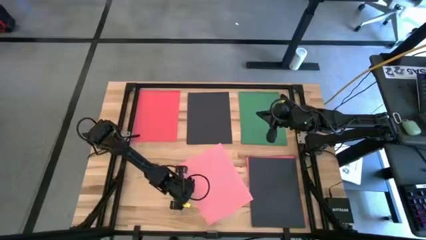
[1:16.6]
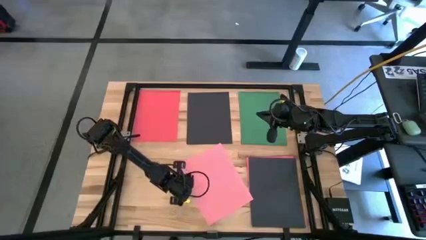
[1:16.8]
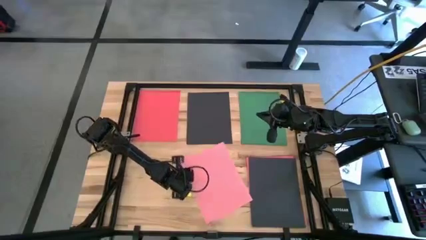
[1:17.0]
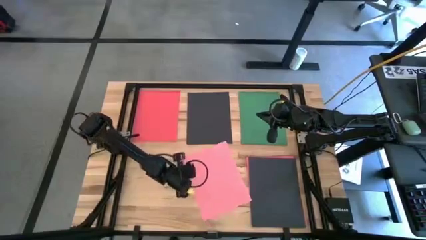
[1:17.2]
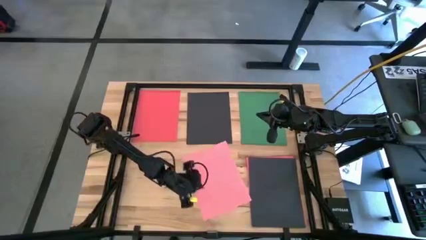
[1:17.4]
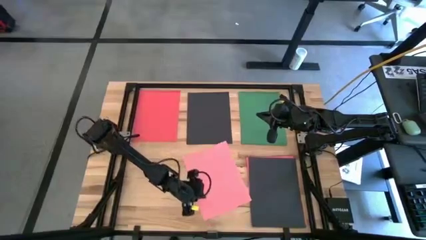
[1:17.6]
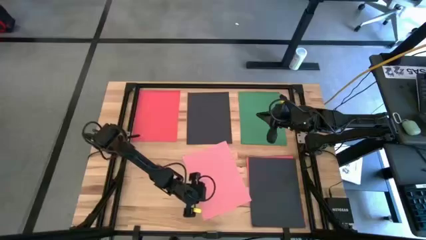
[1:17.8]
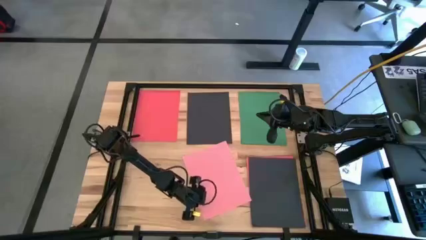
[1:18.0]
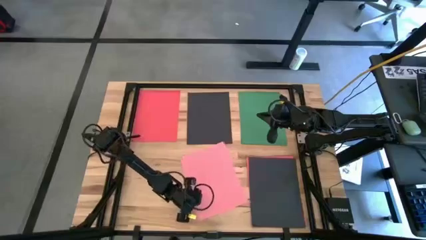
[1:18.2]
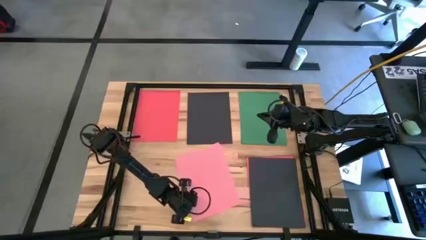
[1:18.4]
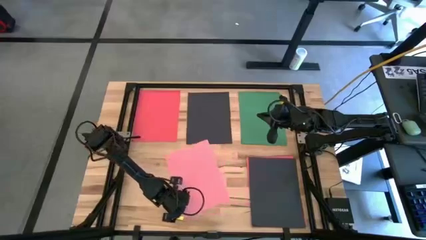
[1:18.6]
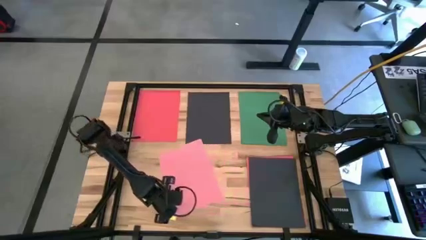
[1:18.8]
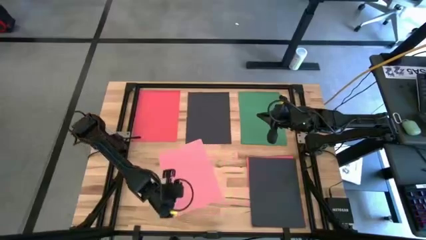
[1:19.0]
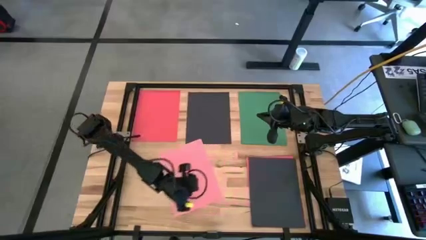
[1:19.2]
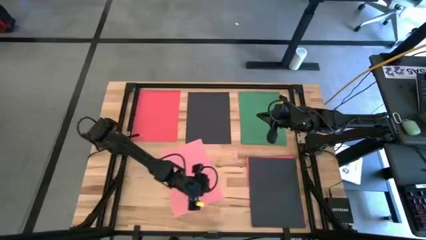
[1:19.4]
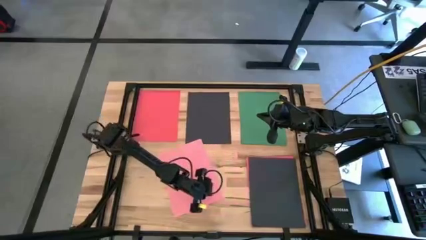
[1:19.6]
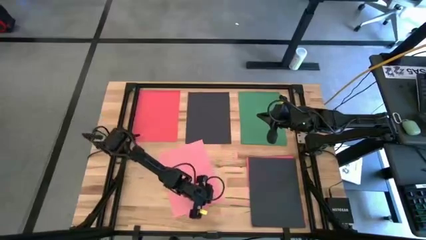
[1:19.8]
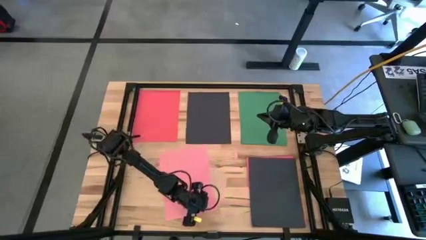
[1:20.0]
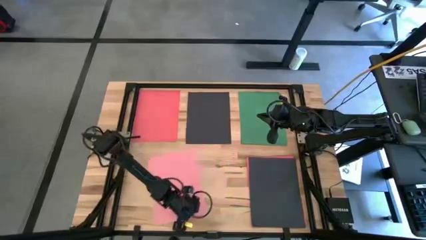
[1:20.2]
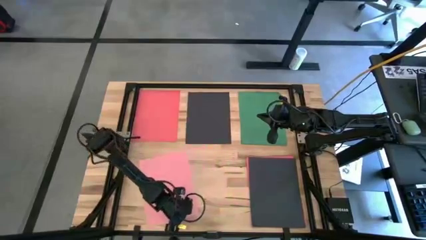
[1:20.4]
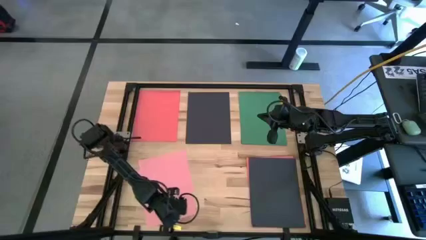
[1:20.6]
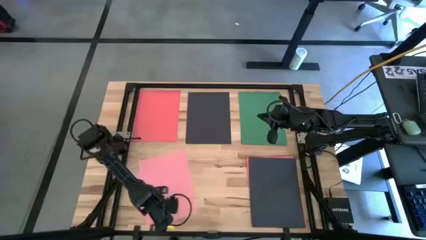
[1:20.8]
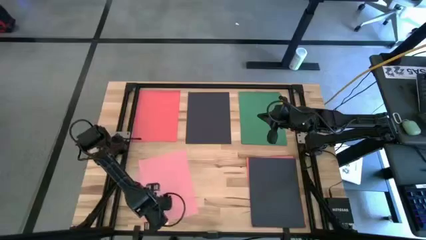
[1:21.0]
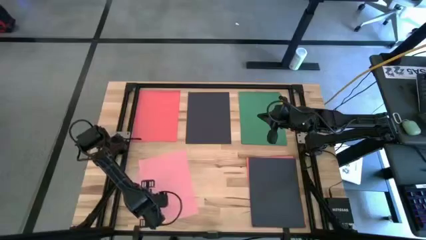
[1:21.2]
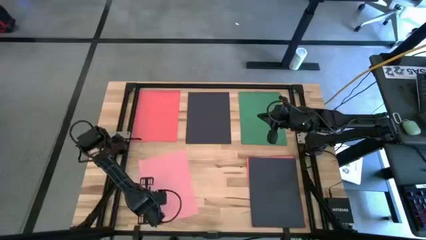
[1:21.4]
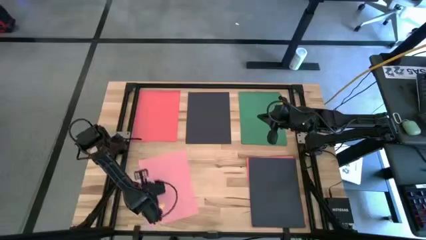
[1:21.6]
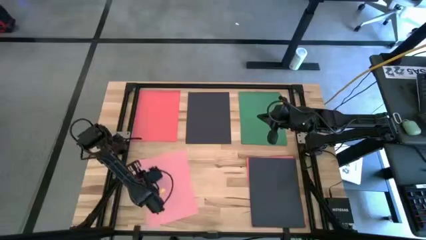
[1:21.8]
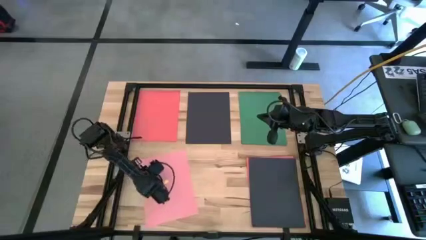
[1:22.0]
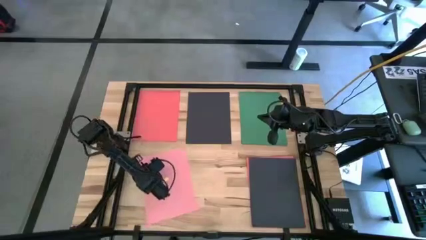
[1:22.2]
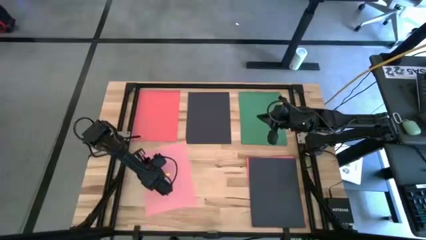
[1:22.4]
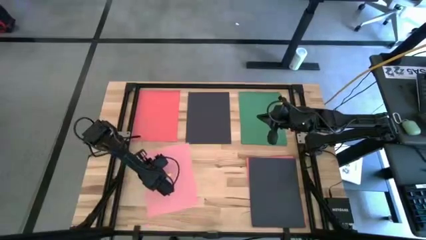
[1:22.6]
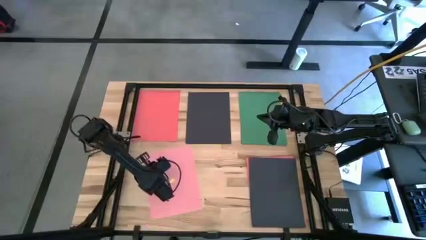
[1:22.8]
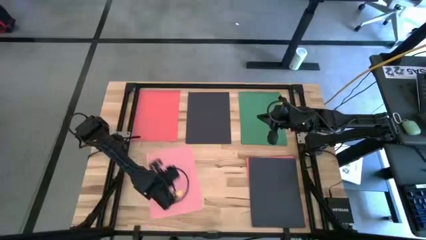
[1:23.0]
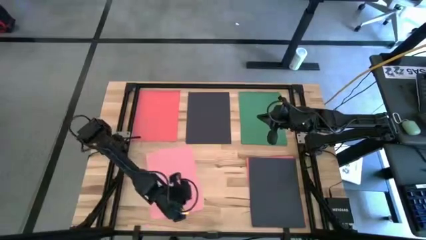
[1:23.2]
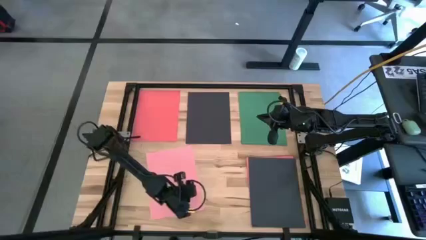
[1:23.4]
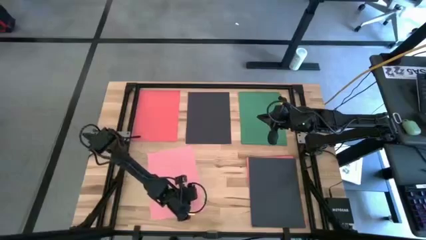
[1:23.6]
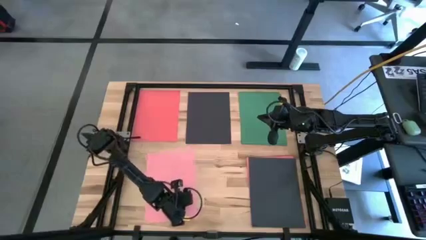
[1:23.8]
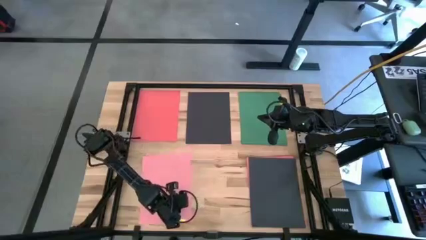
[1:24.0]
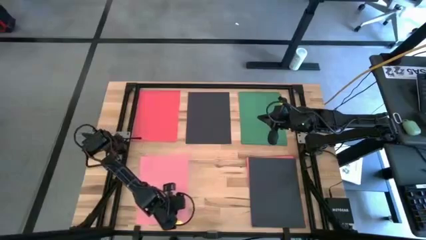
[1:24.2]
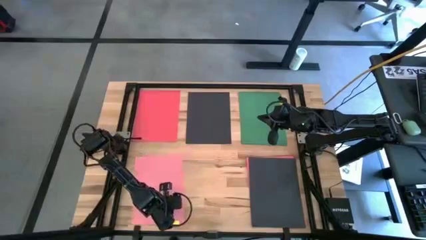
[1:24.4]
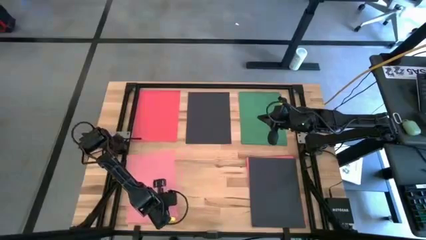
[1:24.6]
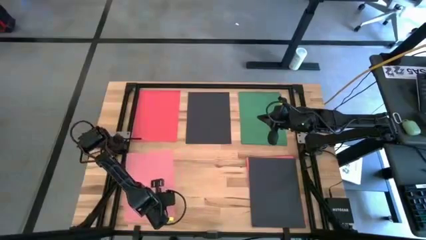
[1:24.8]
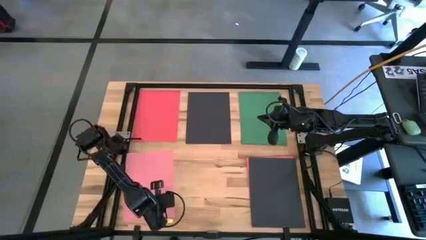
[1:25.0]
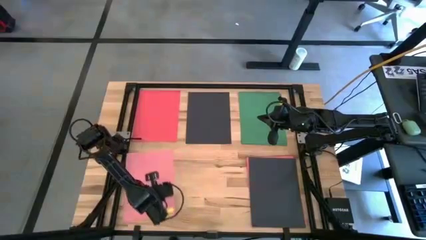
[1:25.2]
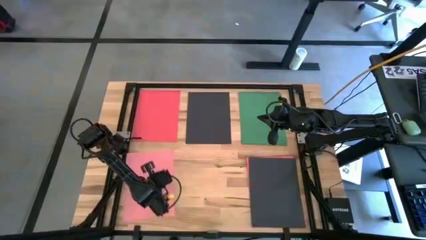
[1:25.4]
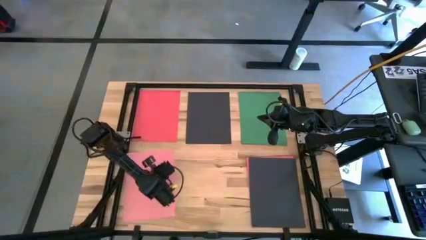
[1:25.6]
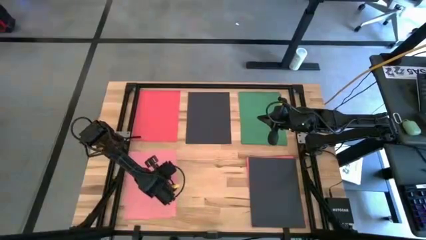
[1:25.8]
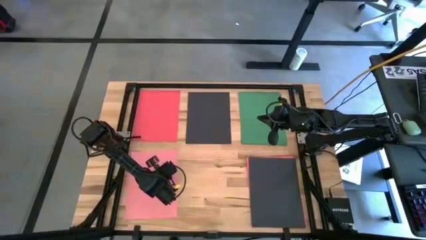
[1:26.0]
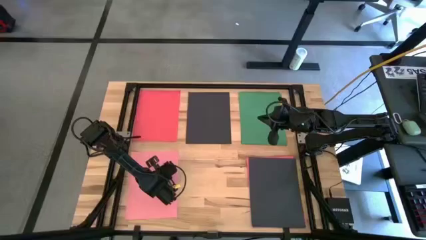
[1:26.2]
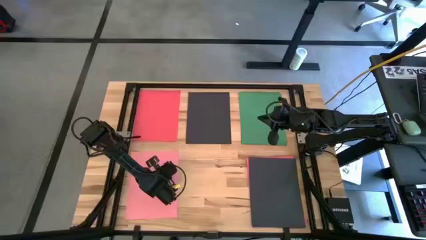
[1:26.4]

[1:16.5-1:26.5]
Task: Organize paper
Move the pink paper to the bottom left of the table
